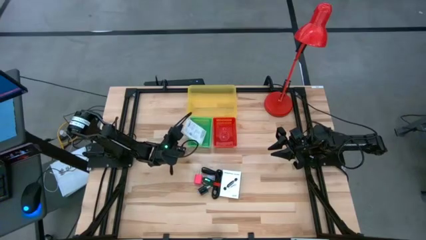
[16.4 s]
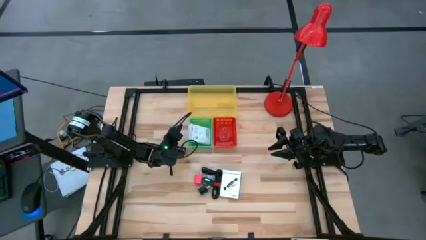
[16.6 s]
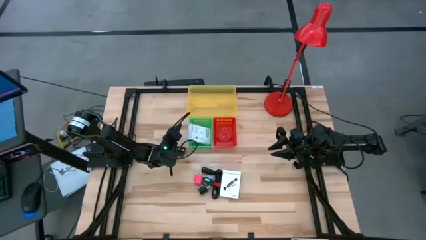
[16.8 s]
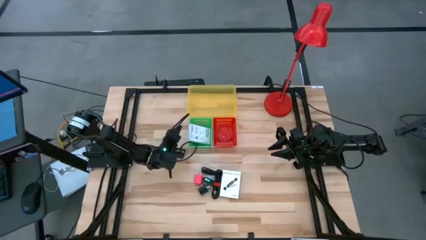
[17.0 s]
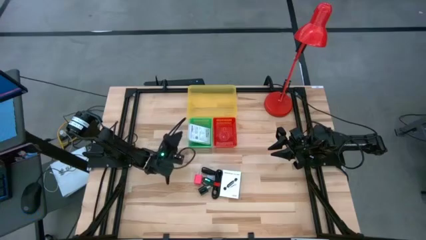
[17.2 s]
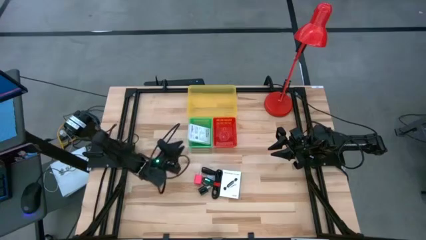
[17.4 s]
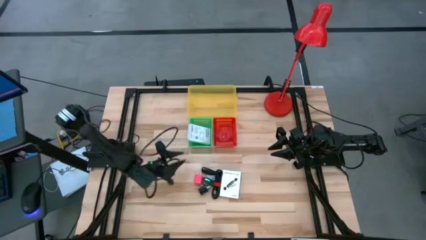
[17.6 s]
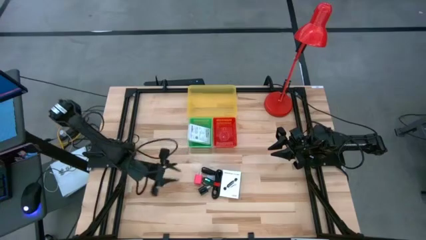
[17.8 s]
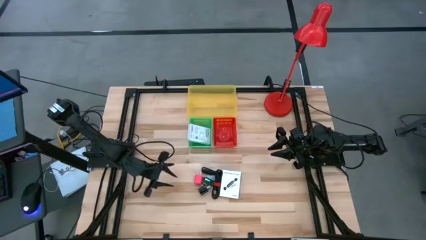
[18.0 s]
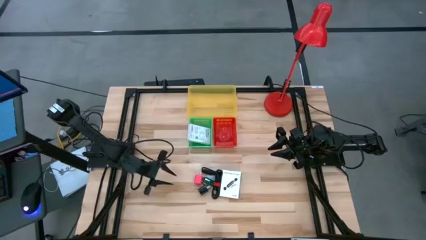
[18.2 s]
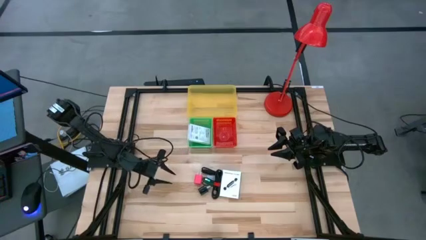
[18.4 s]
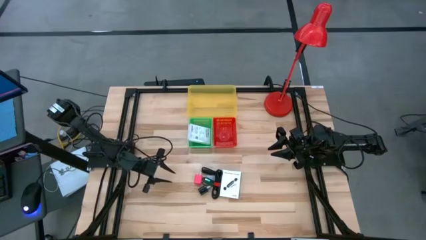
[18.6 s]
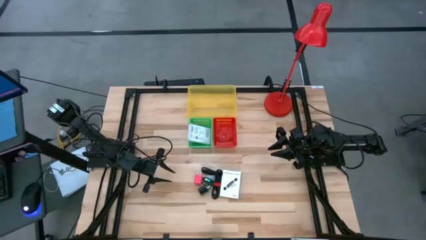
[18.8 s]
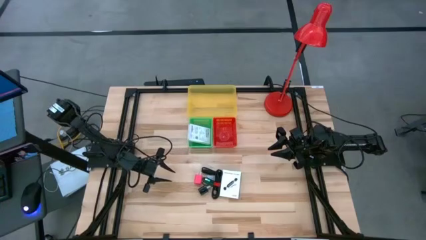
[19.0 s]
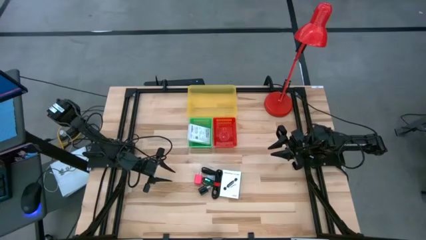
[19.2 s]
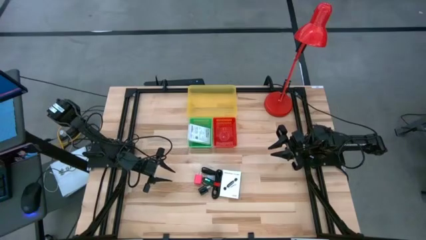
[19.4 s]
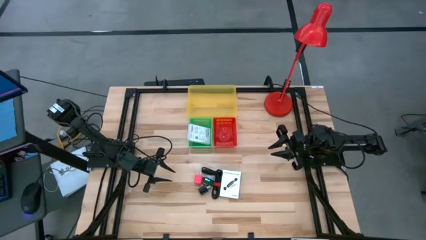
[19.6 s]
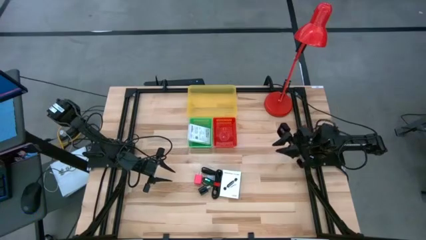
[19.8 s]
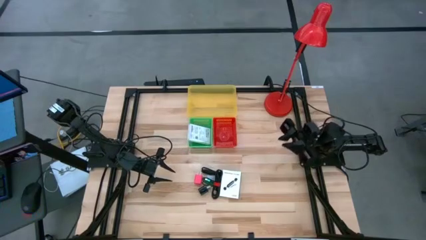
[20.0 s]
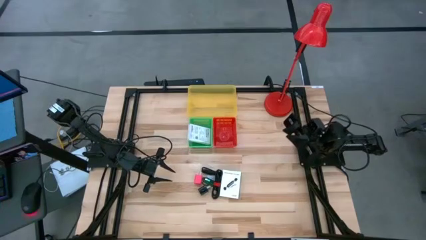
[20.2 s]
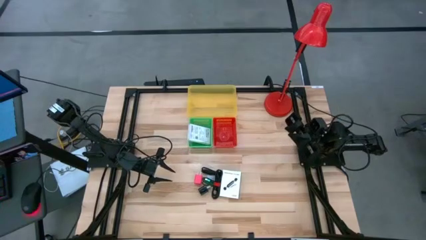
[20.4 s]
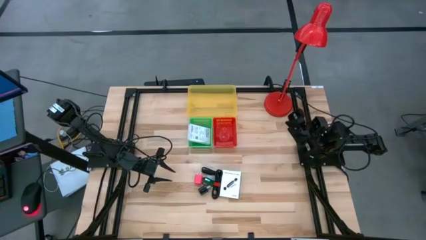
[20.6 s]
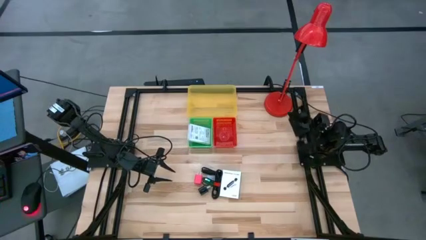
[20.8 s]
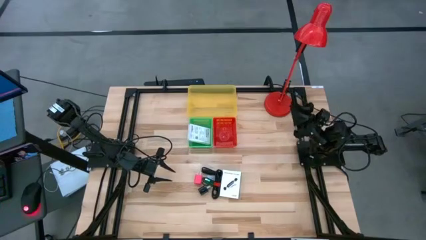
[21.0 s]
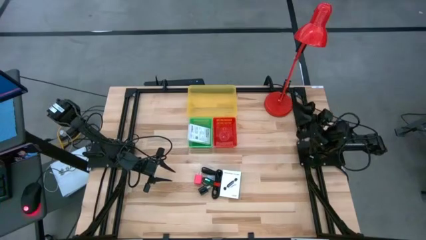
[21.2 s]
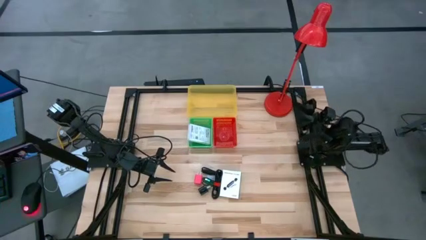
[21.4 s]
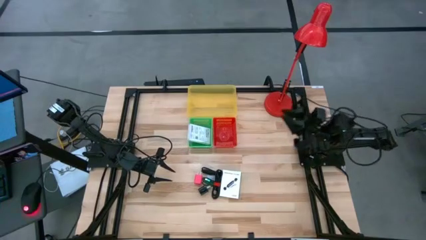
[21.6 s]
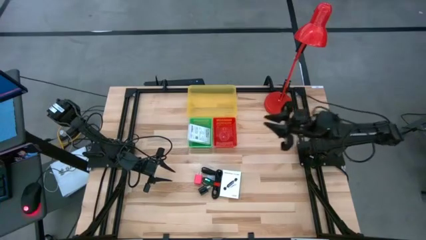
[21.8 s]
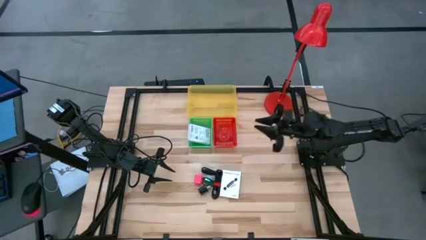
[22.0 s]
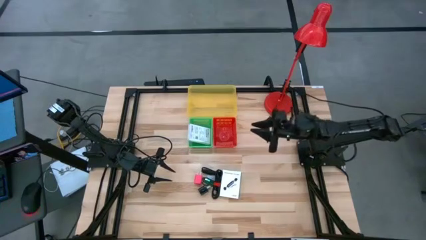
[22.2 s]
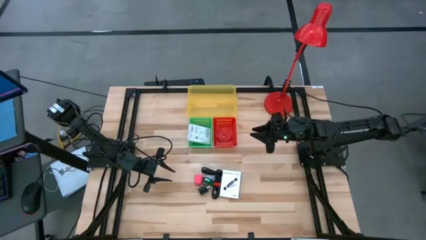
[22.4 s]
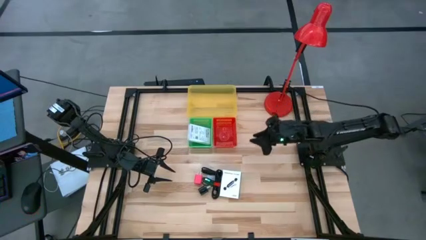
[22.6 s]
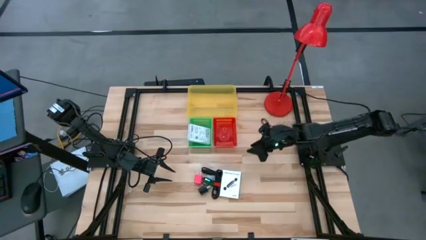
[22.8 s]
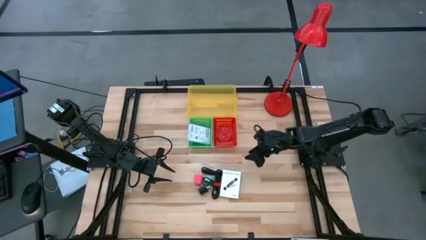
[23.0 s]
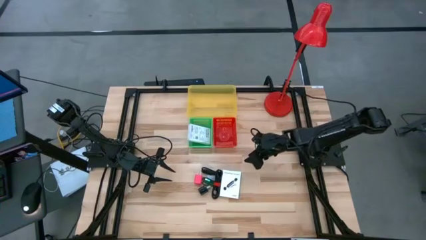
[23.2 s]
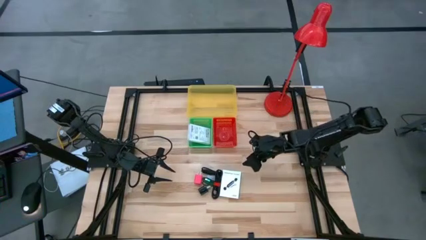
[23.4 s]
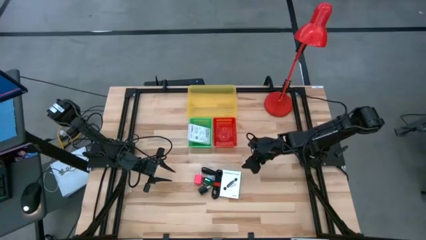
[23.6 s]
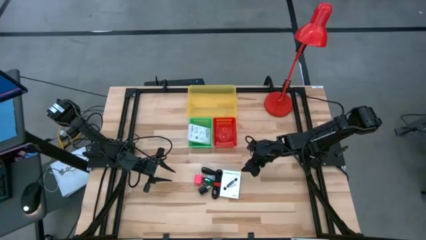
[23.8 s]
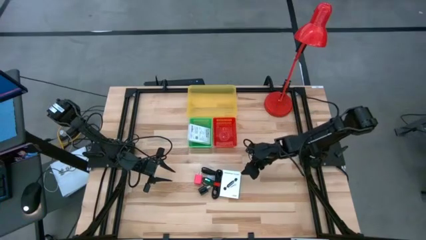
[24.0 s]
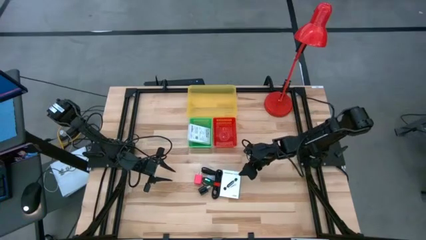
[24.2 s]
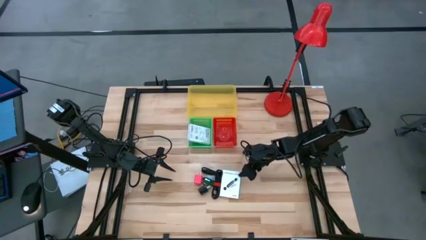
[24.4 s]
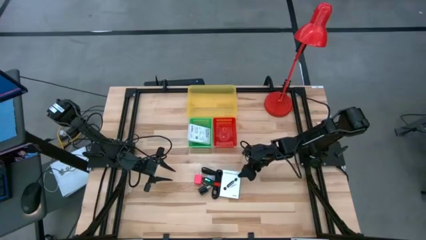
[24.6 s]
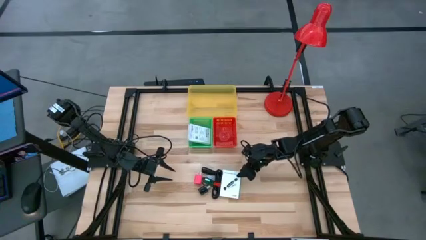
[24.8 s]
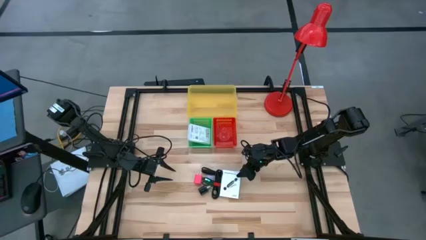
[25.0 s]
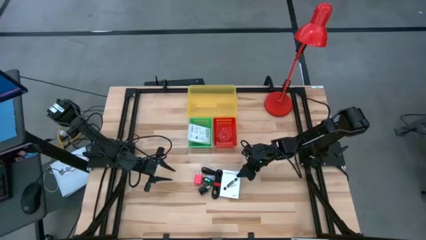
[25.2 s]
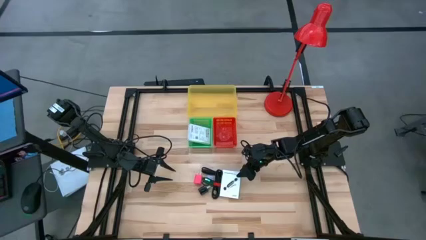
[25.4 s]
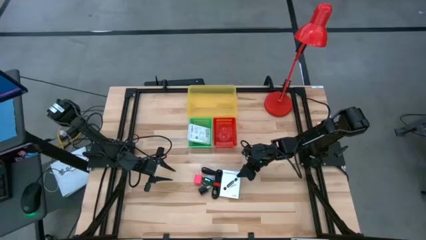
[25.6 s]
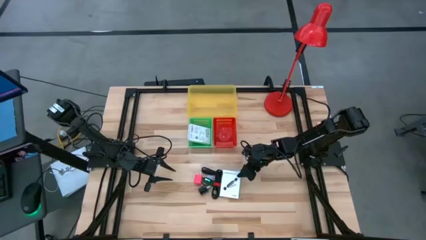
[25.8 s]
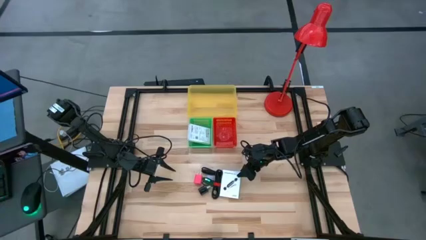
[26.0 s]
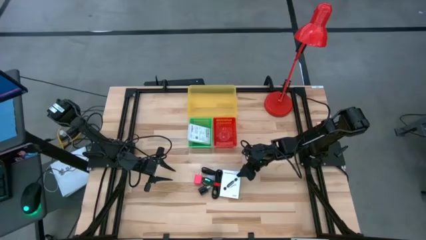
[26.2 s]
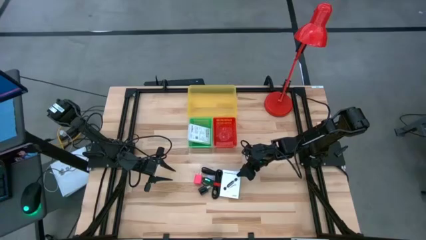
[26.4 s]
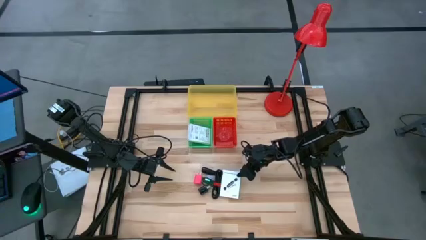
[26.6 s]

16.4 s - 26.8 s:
Task: Pick and place items into bin
Put the white box card reader into the green bin
